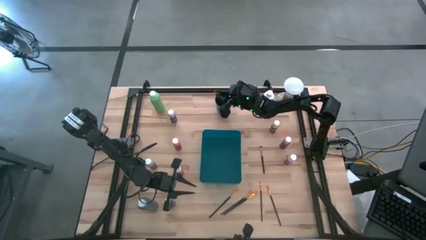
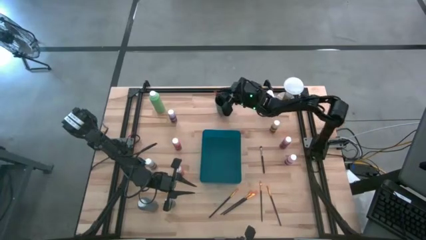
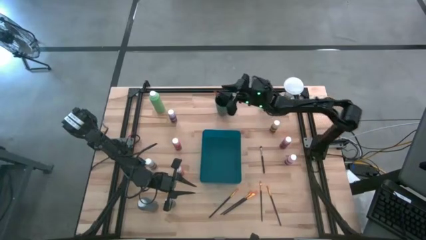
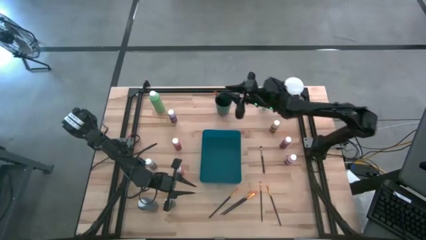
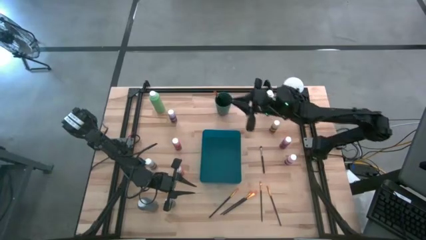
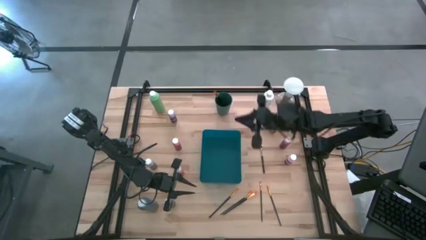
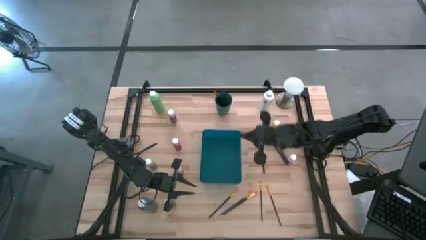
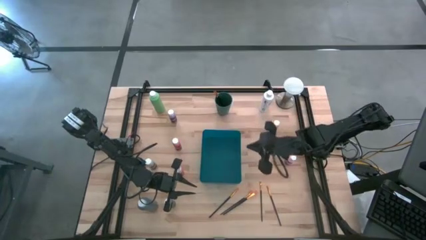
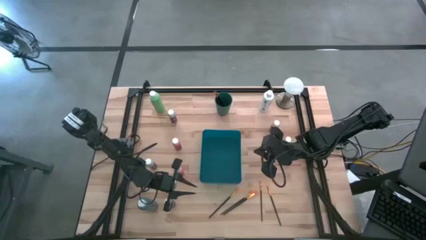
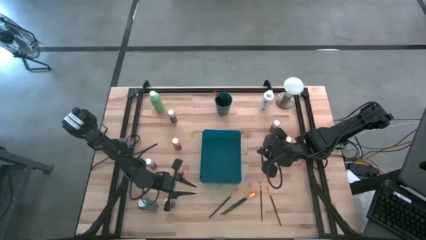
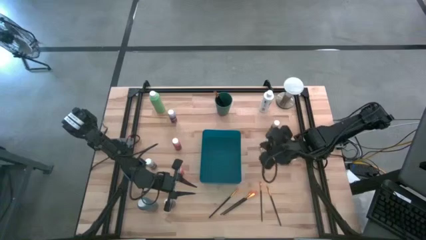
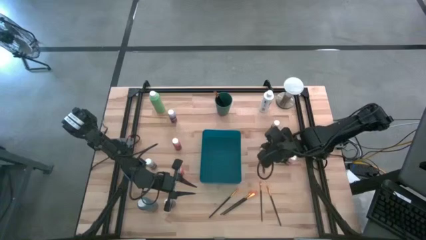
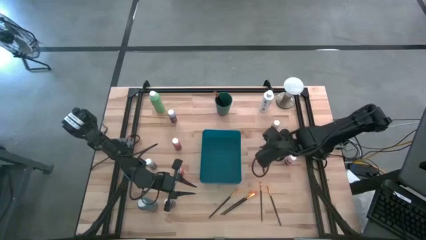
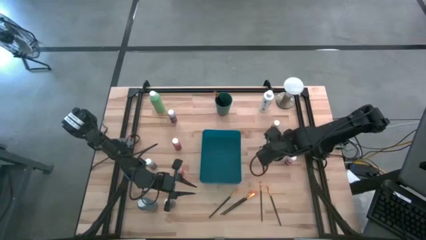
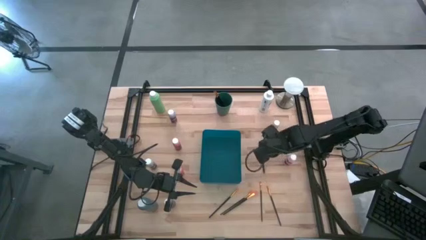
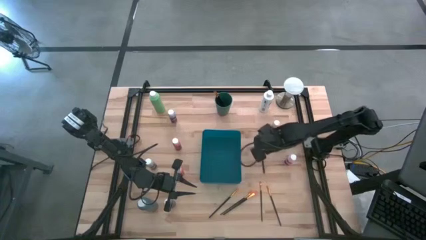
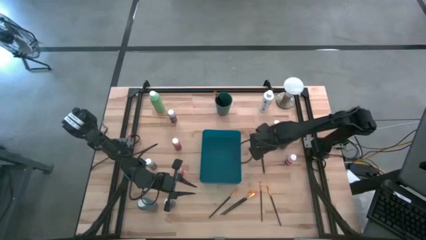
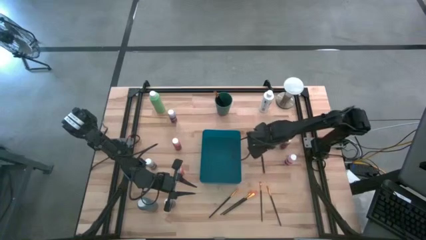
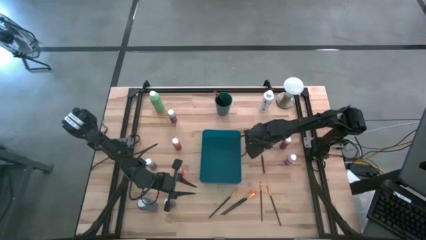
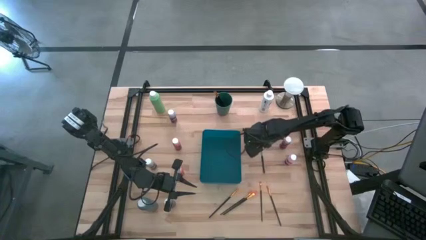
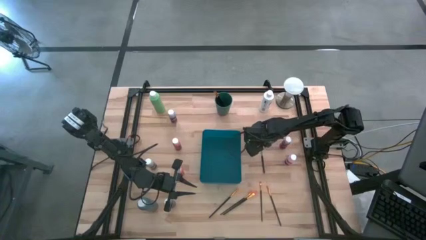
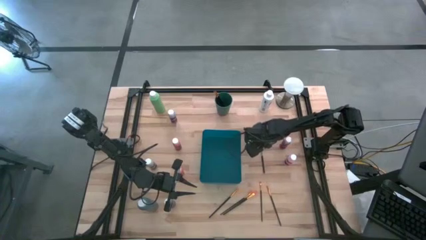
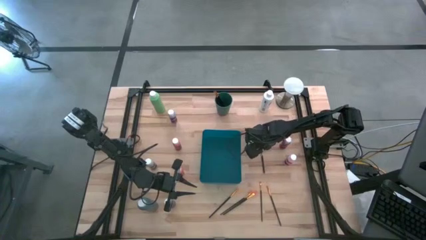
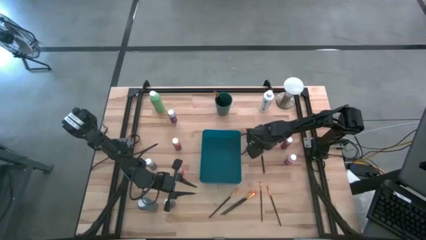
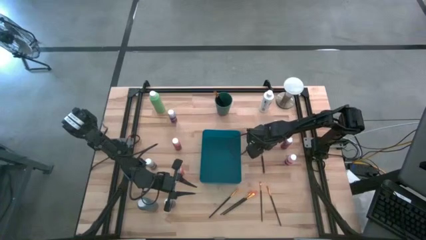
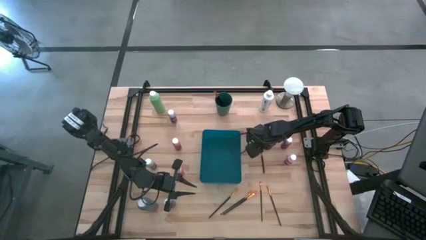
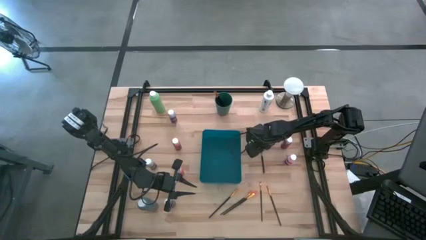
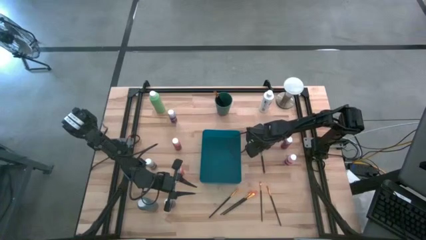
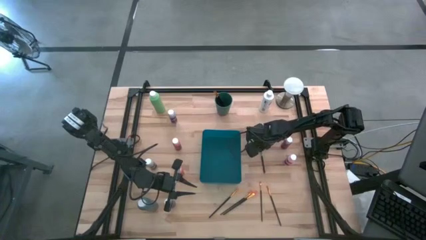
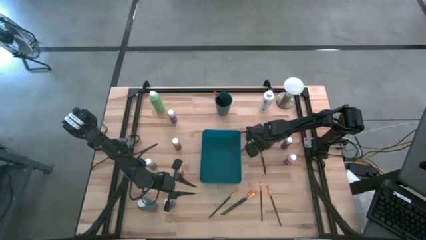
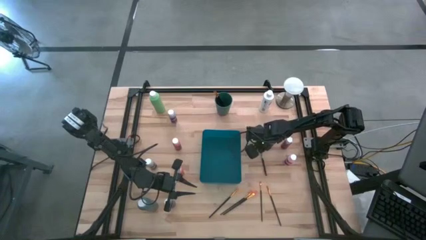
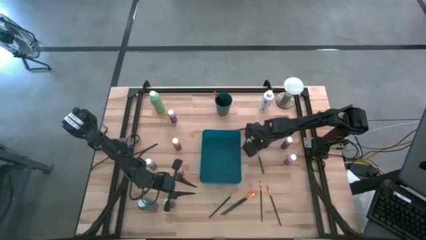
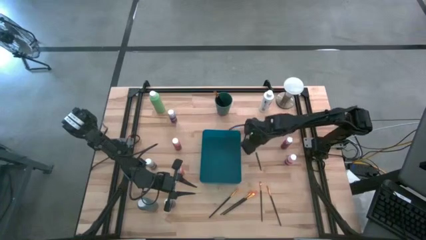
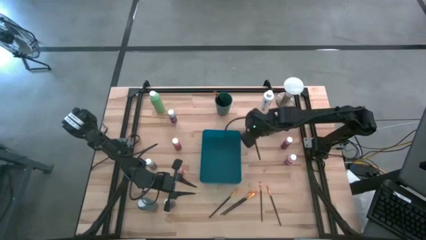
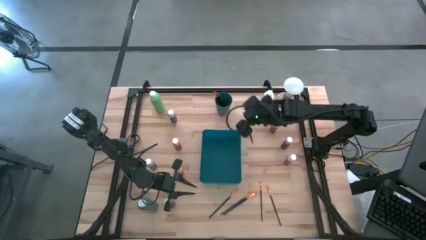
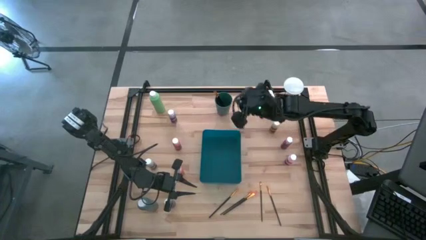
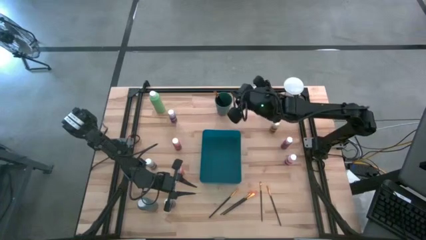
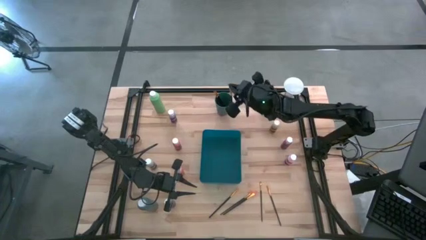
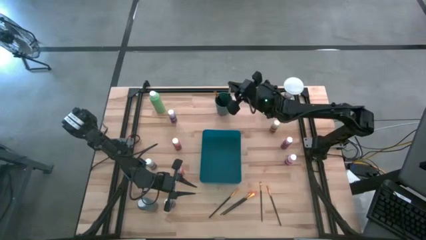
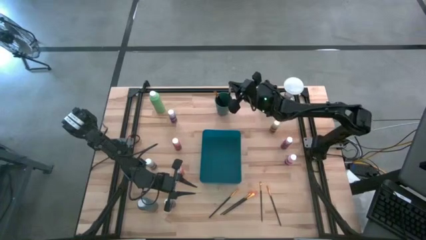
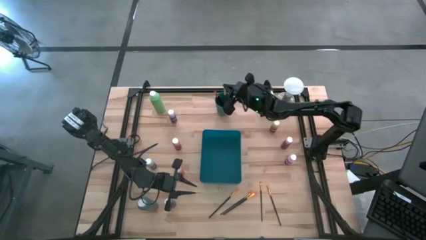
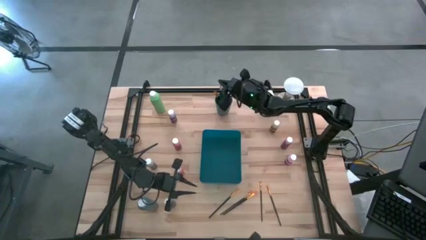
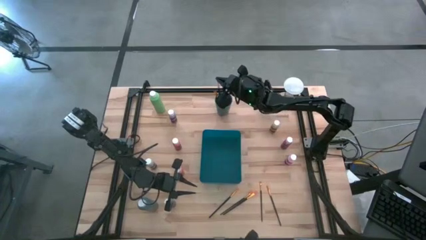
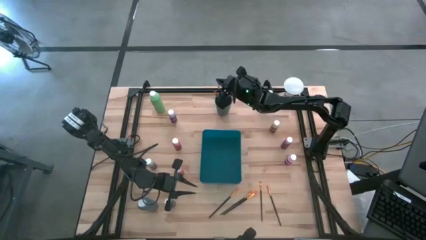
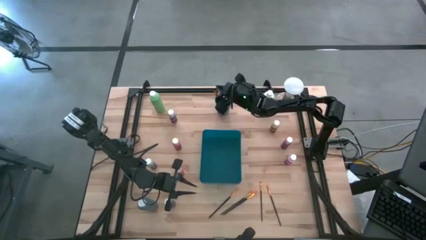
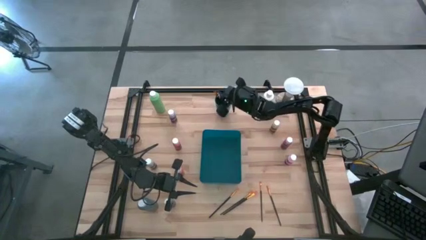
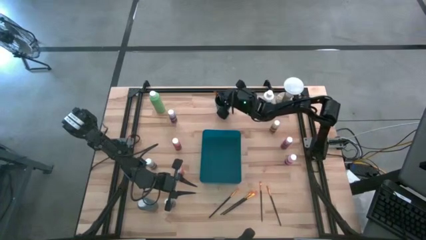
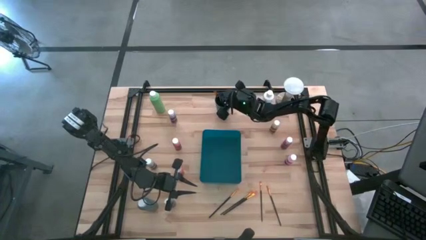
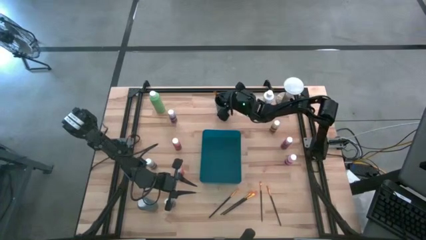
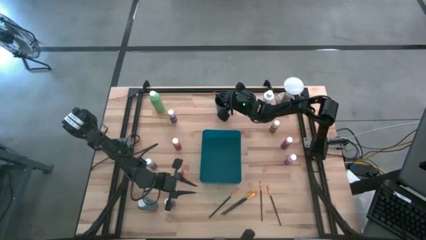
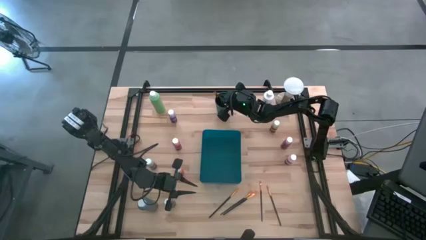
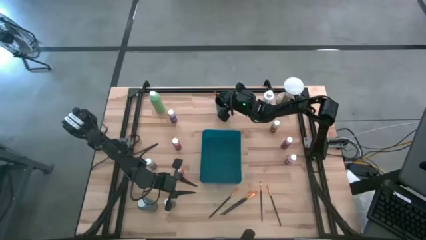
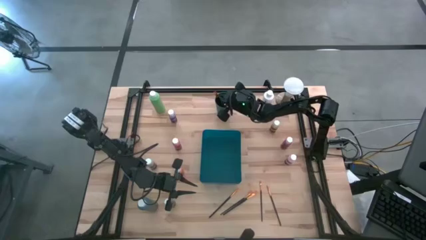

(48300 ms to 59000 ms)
Task: Pick & Place Paint Supplies
Put the silver paint brush into the green cup

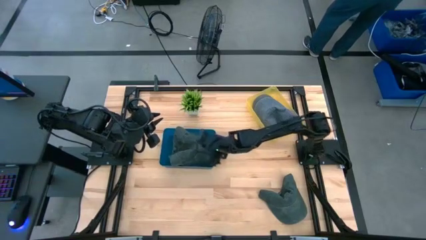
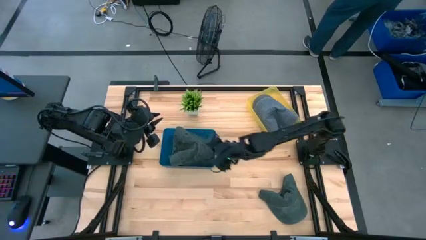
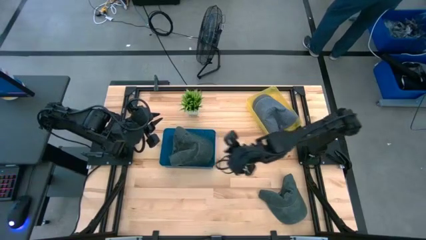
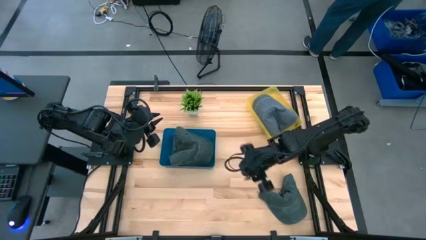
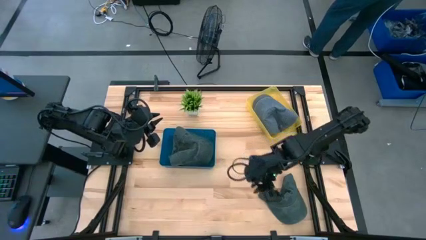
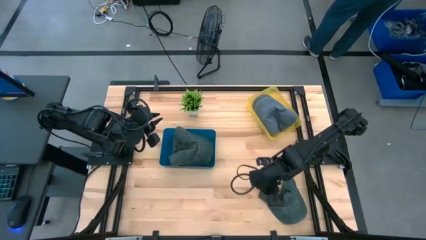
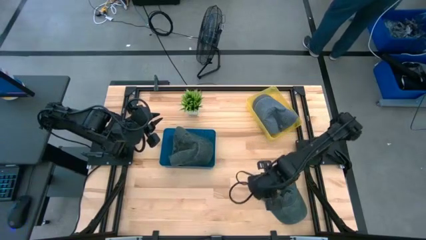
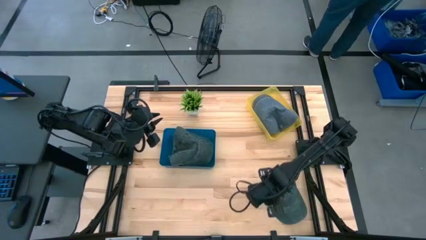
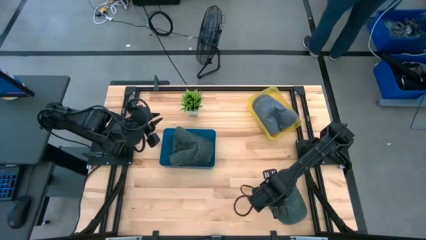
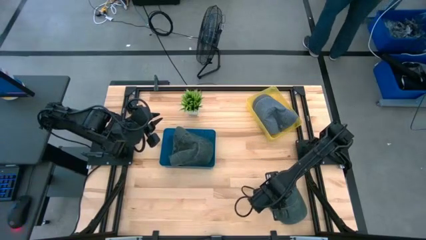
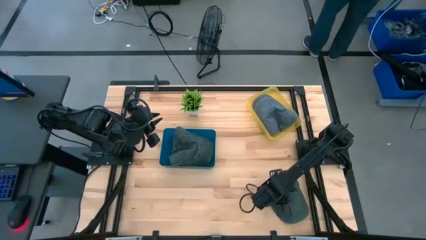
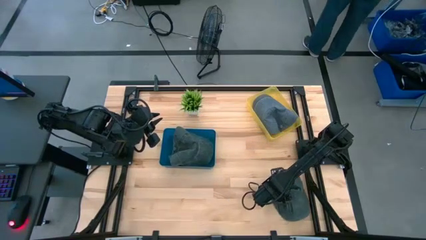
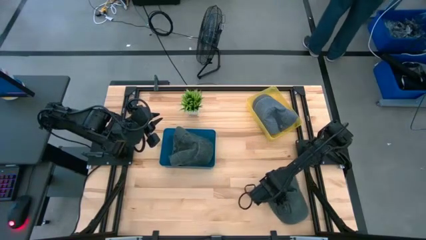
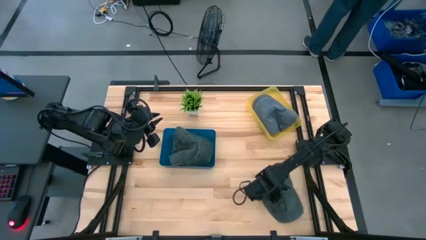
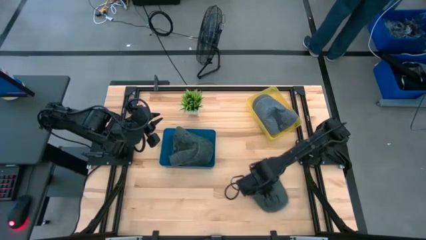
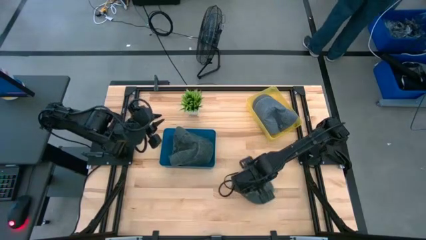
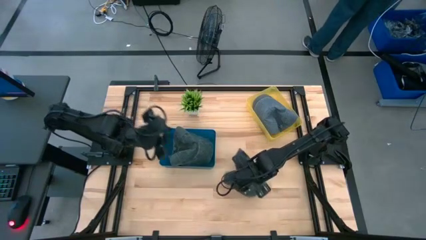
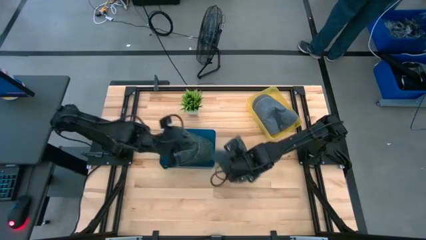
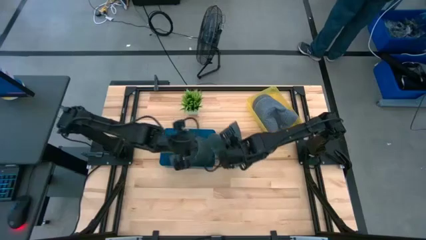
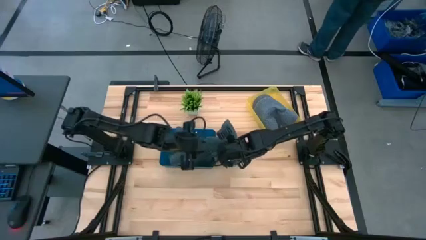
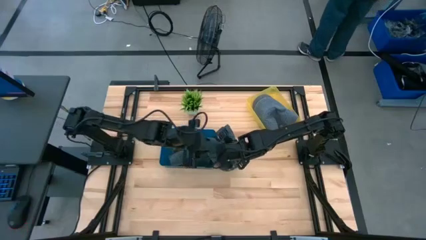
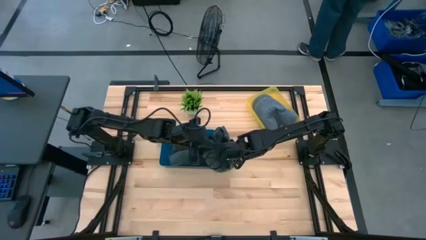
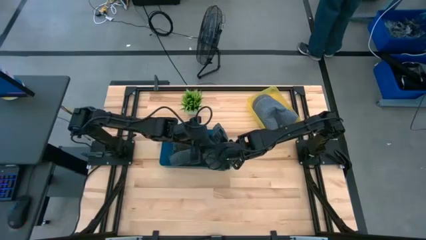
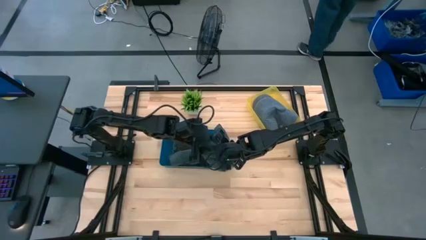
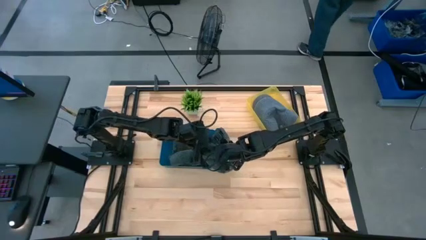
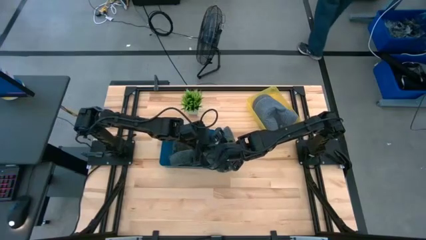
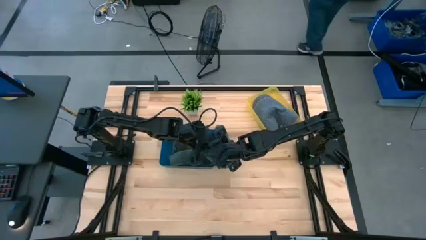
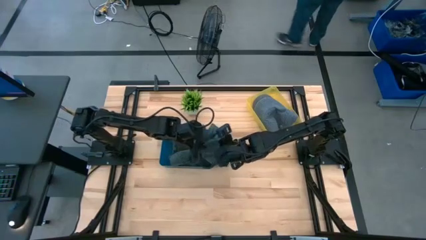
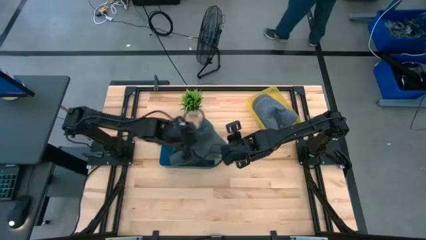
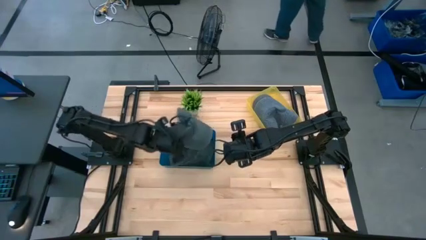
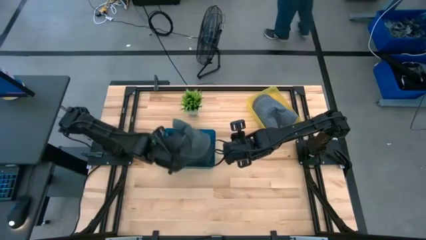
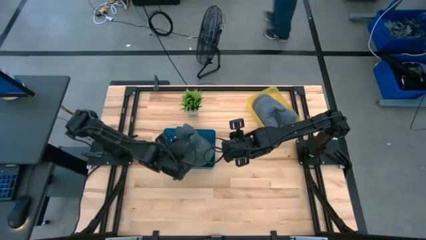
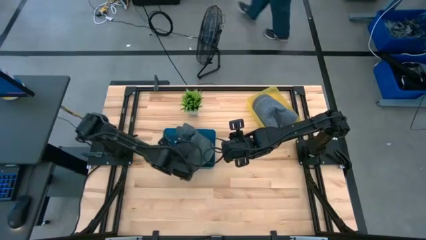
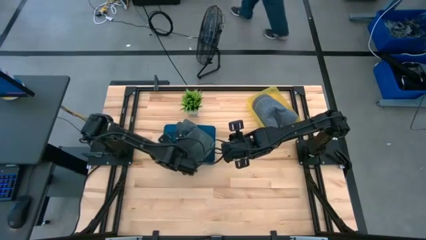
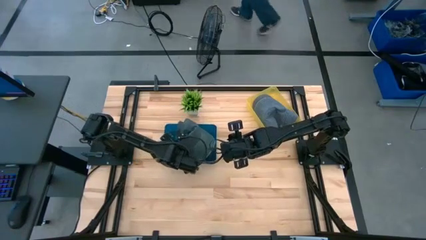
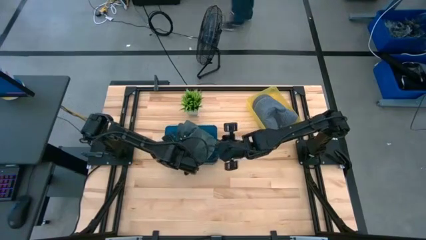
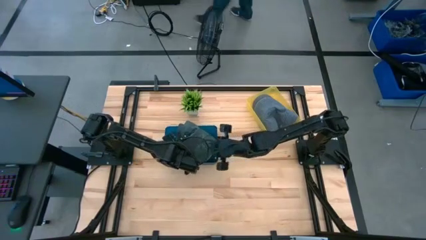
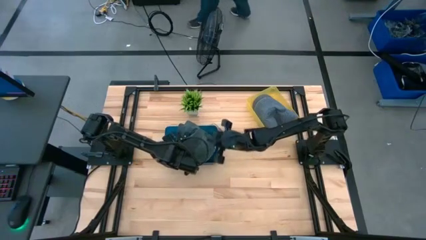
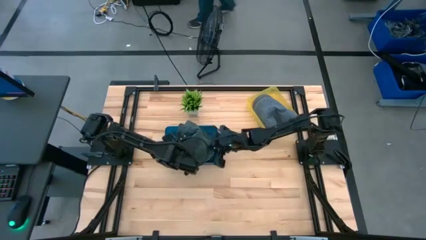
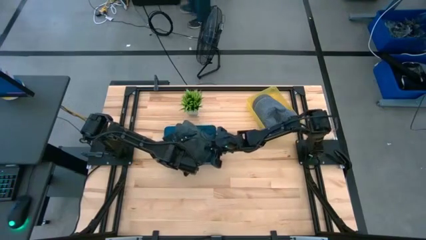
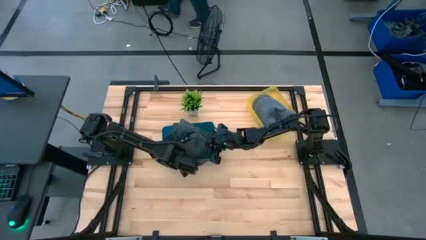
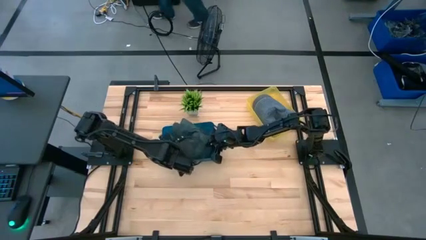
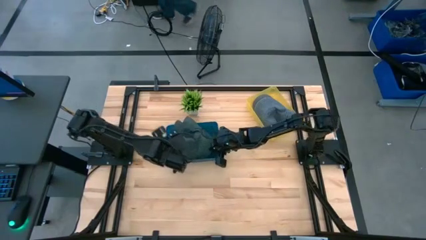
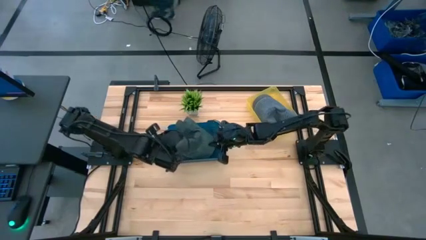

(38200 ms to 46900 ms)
Task: Pick & Place hat
Put the black cap into the blue bin
